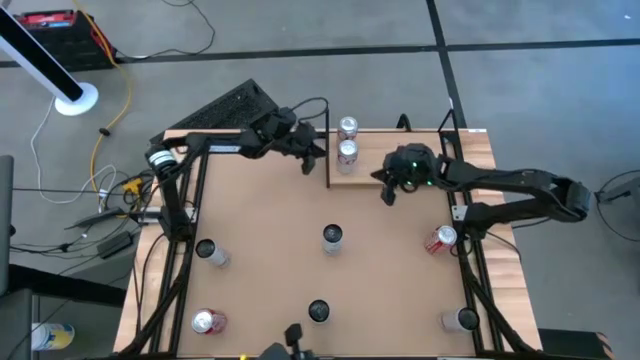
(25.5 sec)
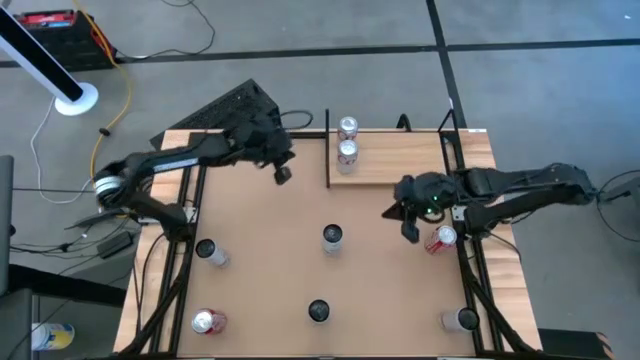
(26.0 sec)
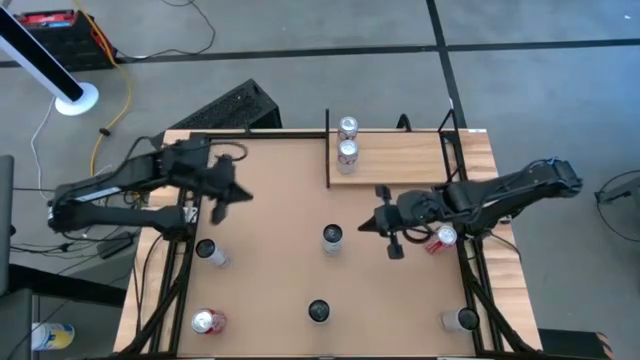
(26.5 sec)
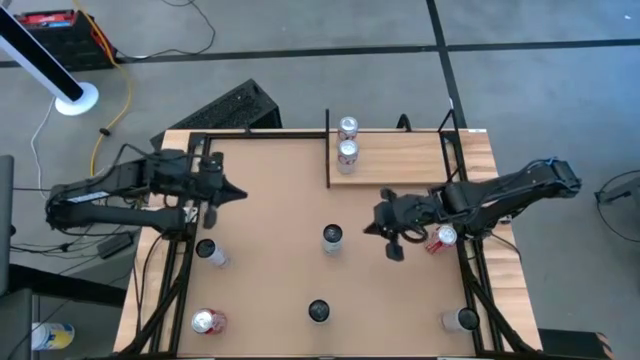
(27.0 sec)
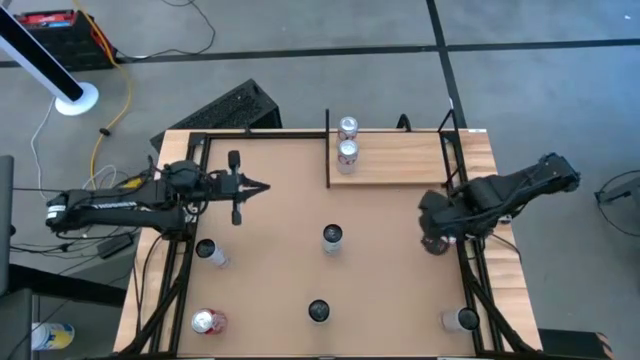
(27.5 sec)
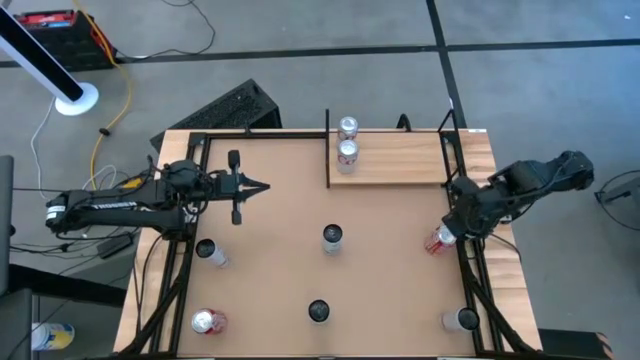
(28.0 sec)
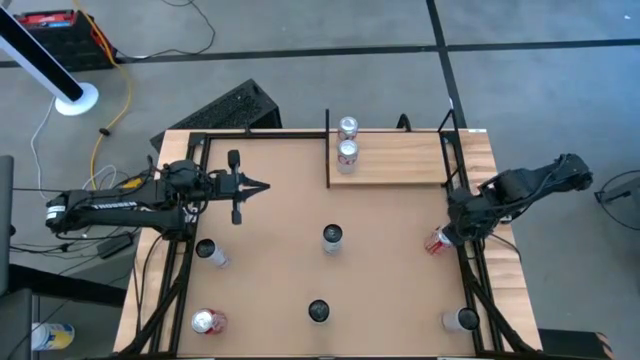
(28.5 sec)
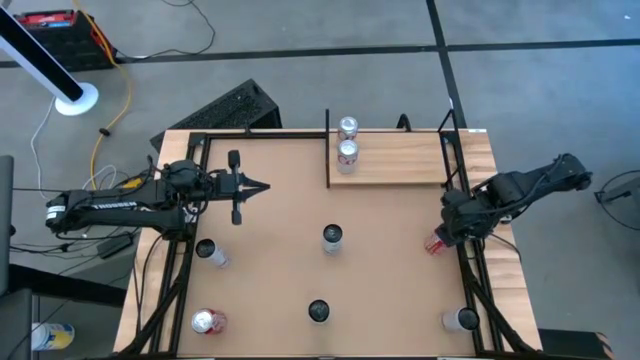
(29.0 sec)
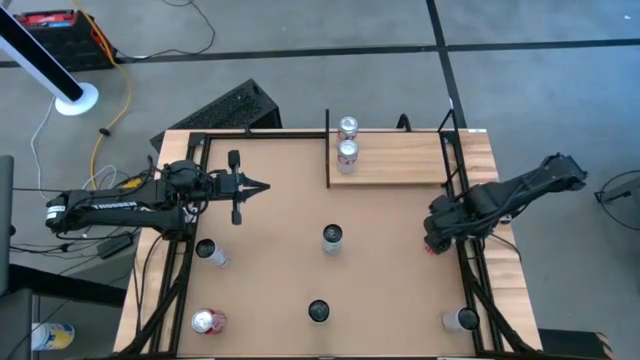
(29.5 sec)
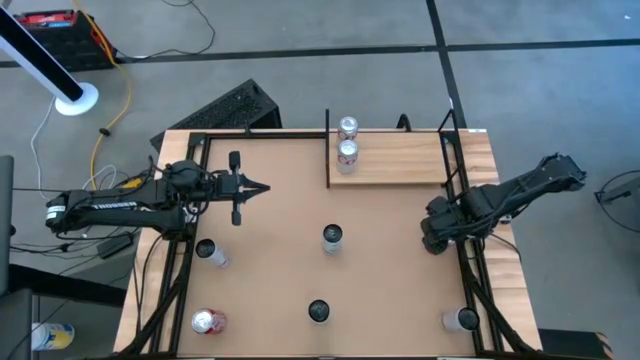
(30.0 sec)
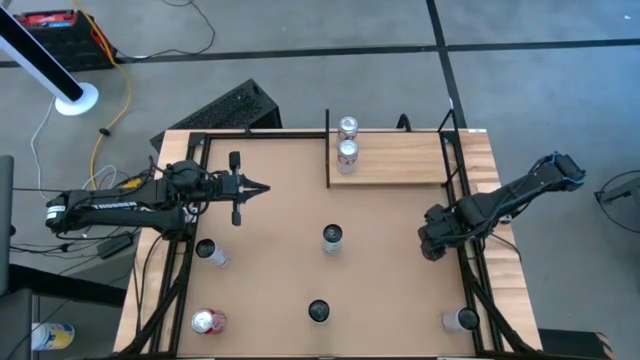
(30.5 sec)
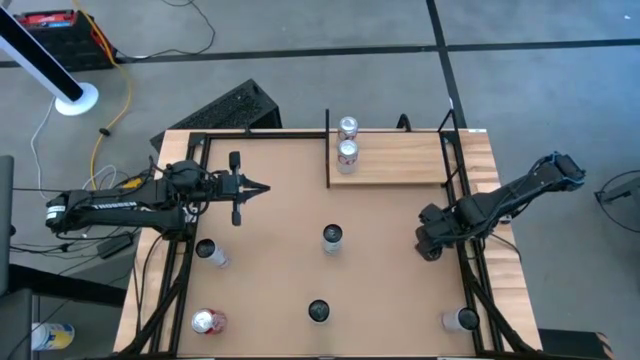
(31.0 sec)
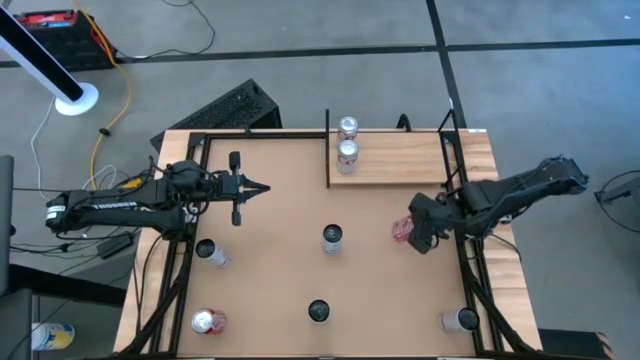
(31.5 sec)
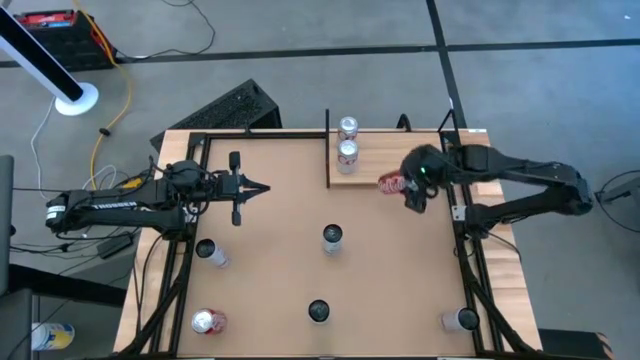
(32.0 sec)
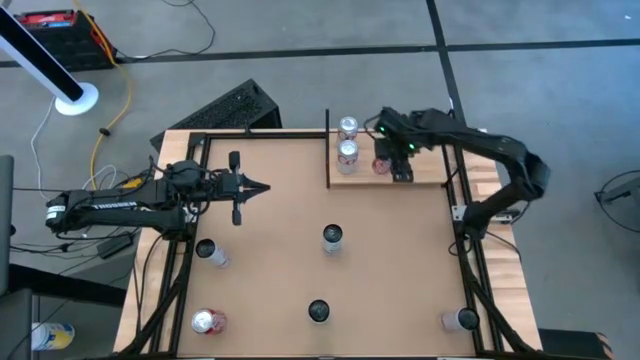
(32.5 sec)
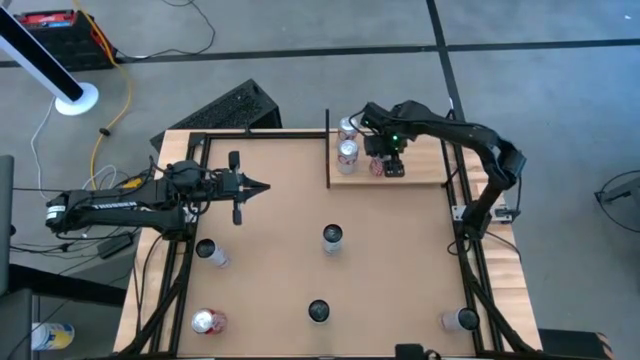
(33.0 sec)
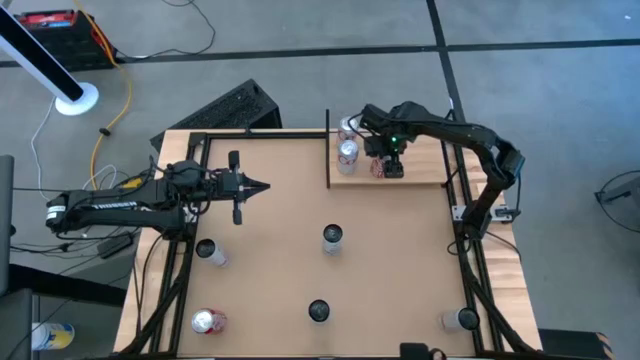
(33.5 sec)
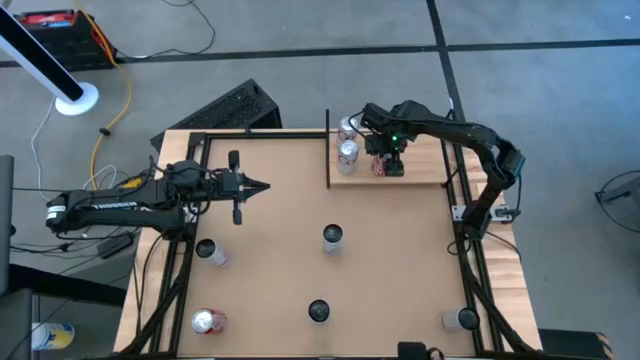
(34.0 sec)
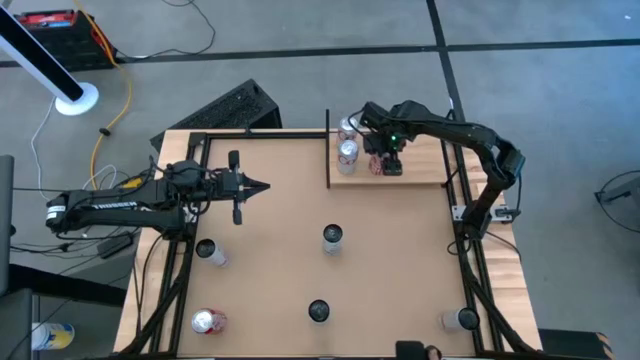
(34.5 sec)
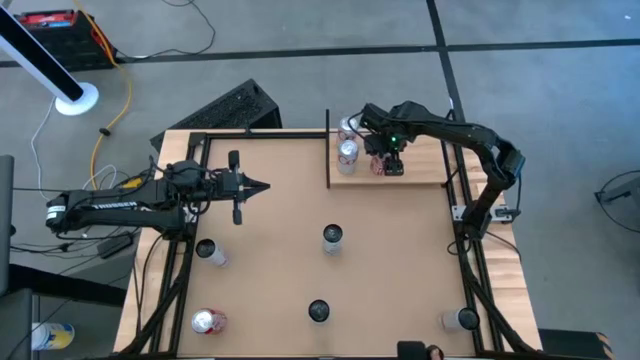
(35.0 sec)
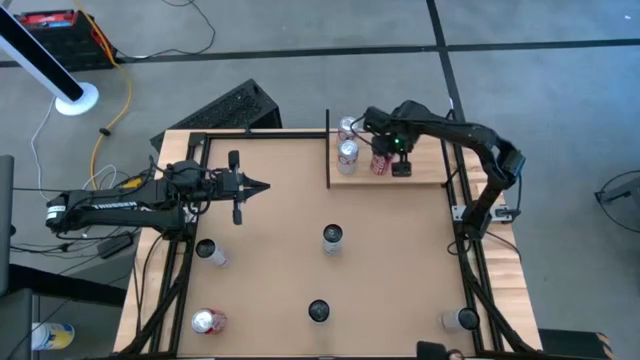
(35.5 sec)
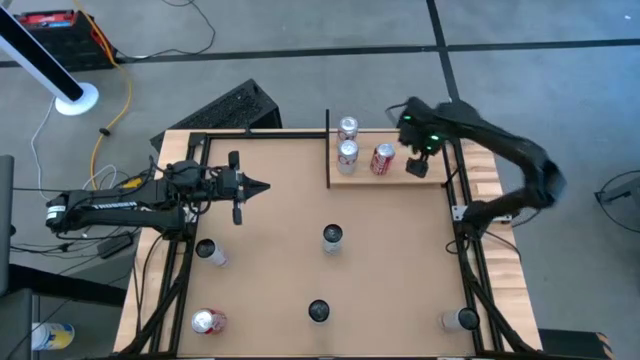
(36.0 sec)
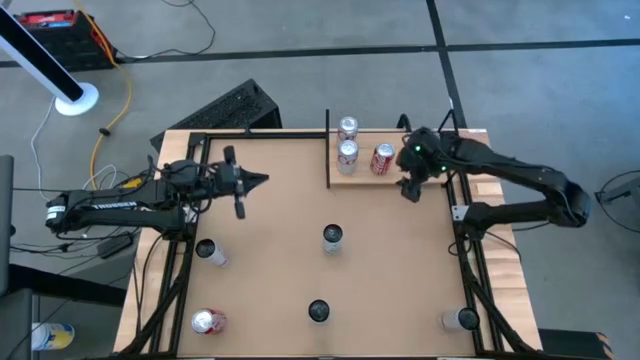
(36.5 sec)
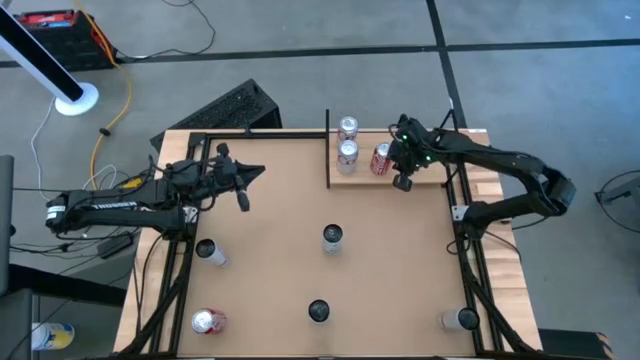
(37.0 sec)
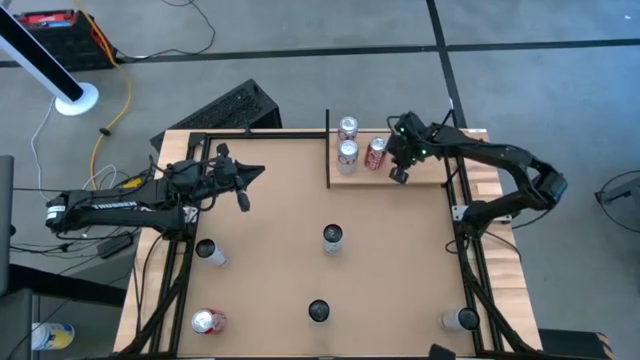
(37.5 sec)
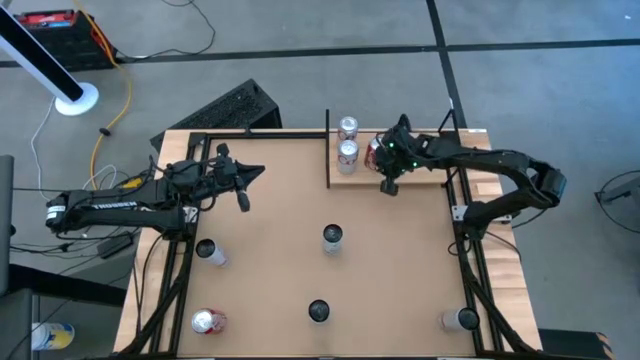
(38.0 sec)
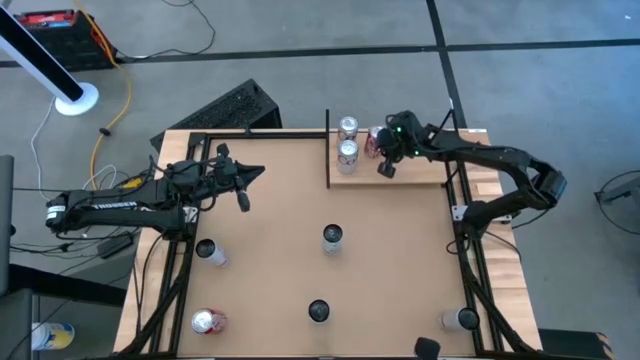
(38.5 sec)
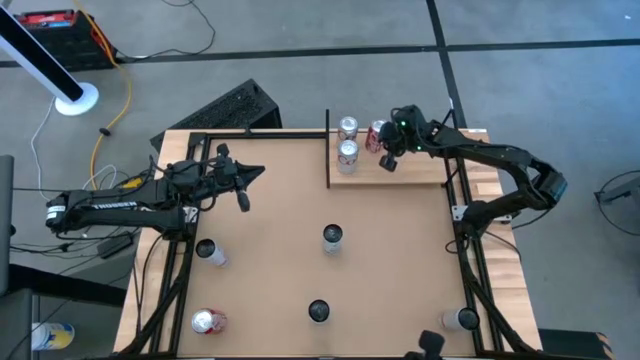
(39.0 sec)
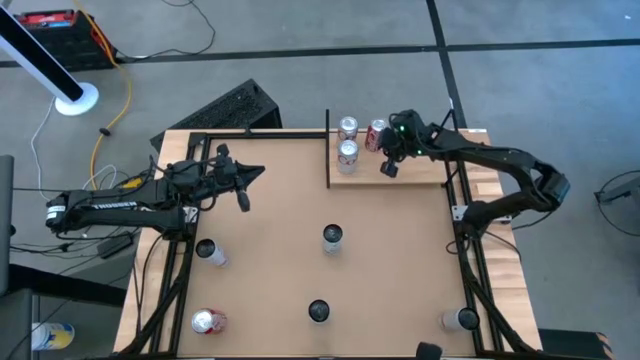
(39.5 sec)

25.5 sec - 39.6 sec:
Task: Place canned beverage on shelf
Put the right red-white soda can on the shelf

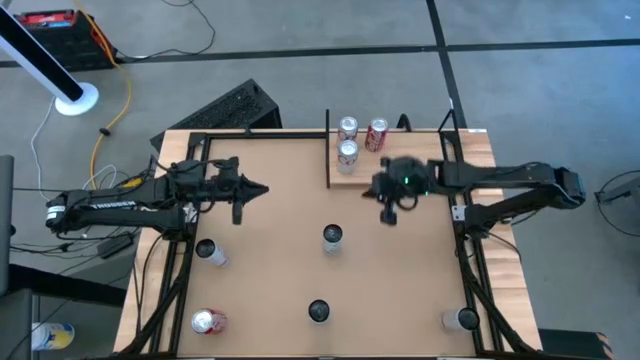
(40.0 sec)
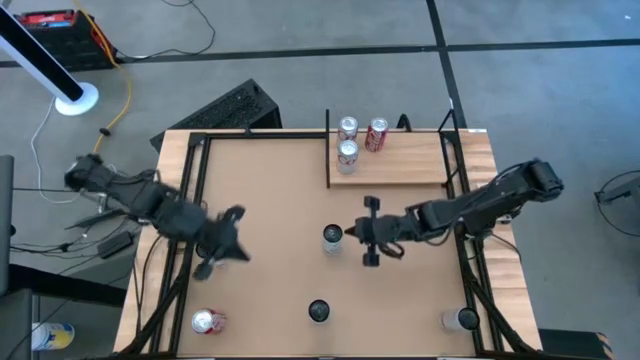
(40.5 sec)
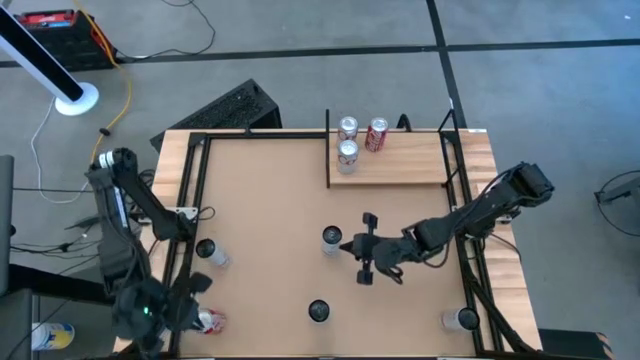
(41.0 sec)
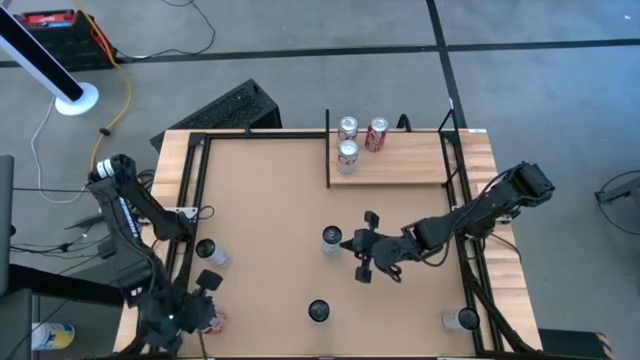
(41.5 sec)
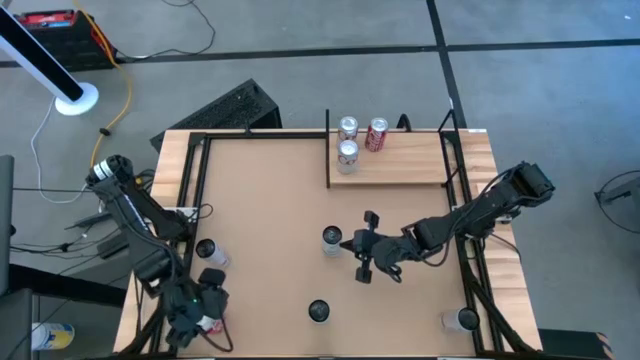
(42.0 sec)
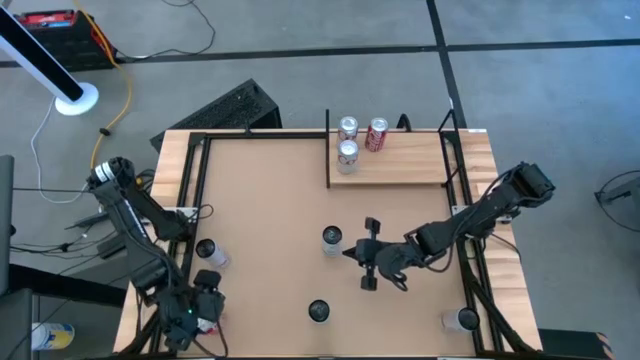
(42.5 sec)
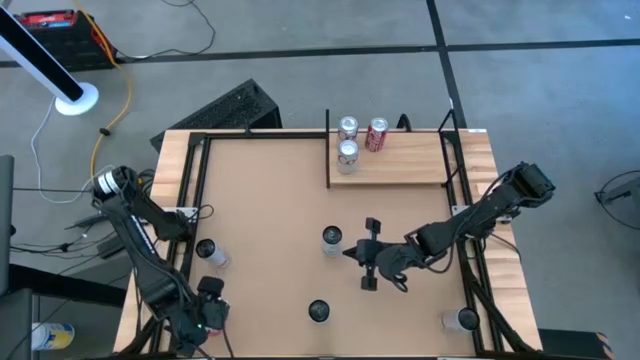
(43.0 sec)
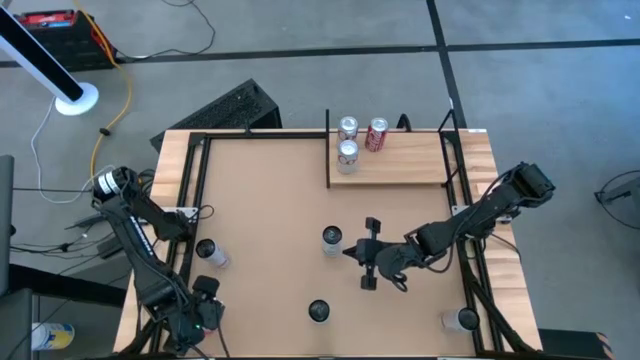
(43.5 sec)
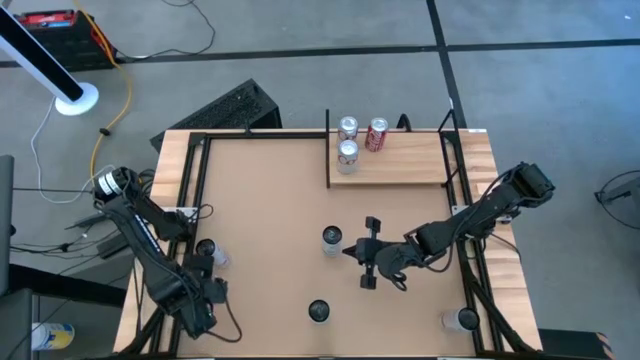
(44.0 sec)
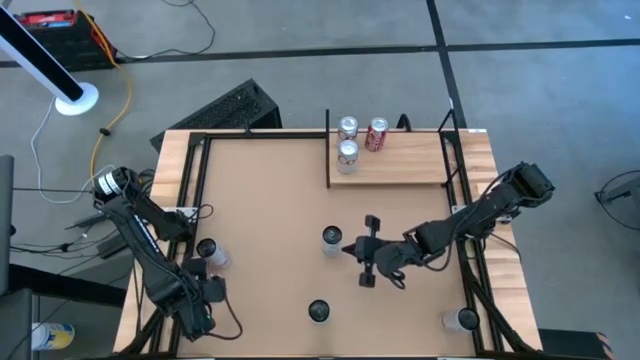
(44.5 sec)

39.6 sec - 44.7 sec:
Put the red-white soda can on the shelf aligned with the other red-white soda can
